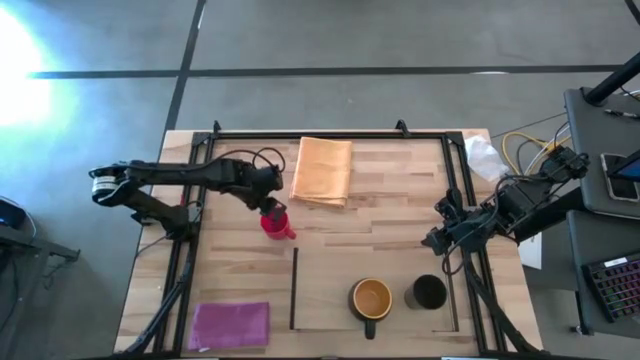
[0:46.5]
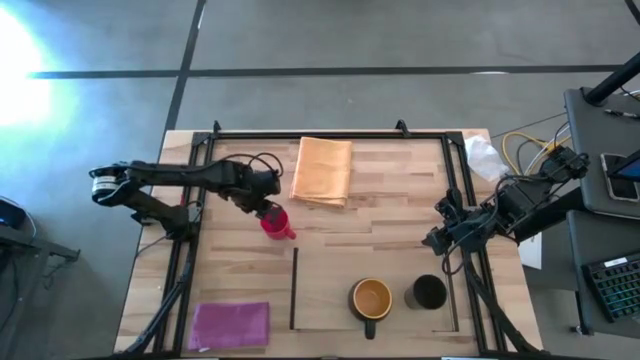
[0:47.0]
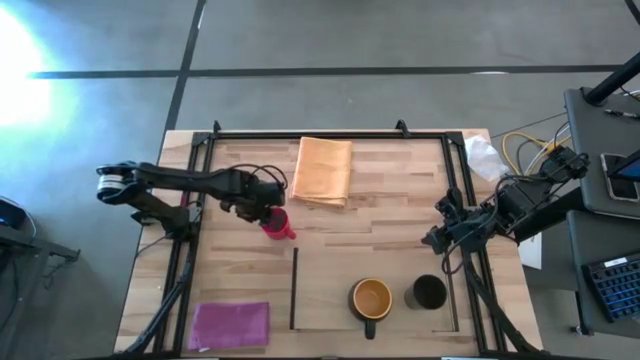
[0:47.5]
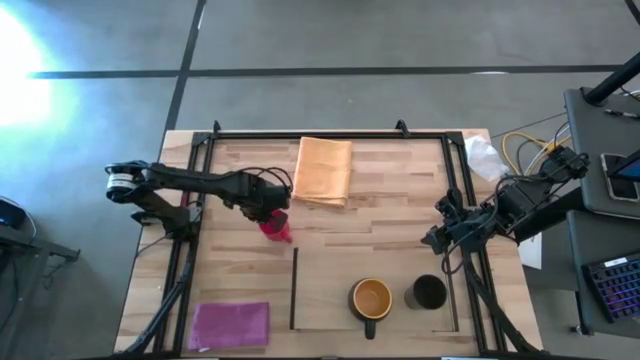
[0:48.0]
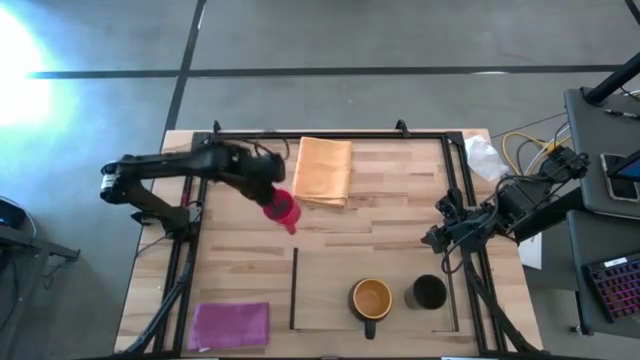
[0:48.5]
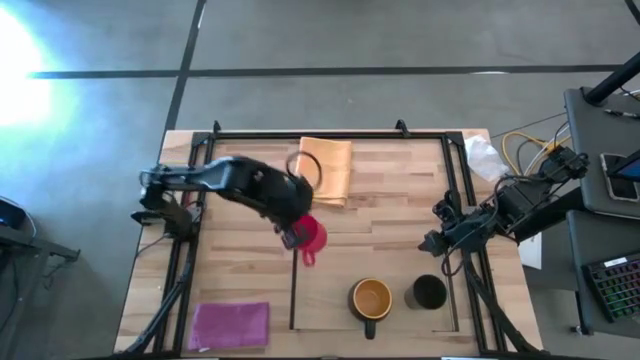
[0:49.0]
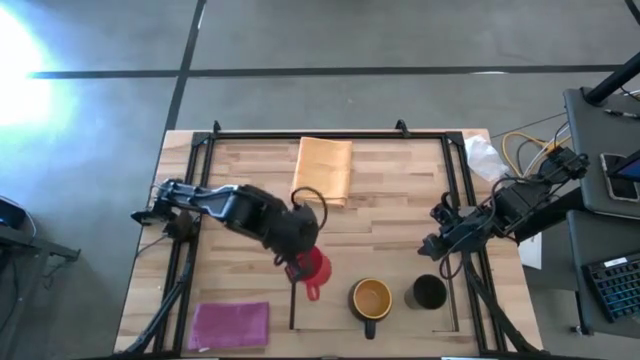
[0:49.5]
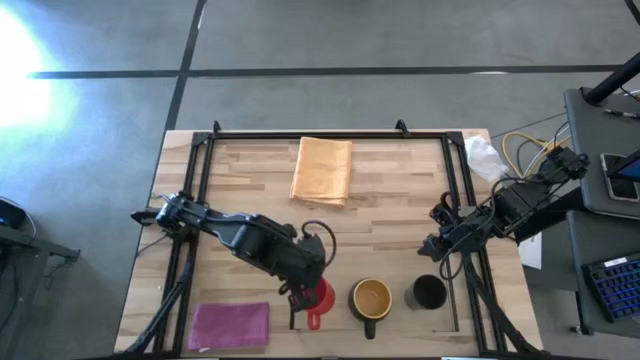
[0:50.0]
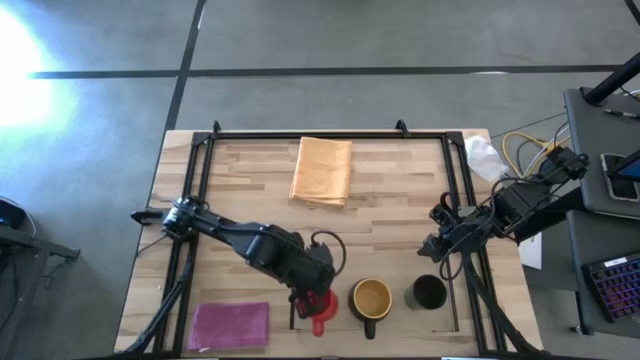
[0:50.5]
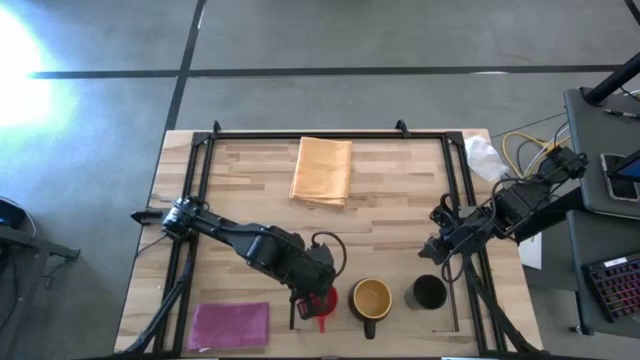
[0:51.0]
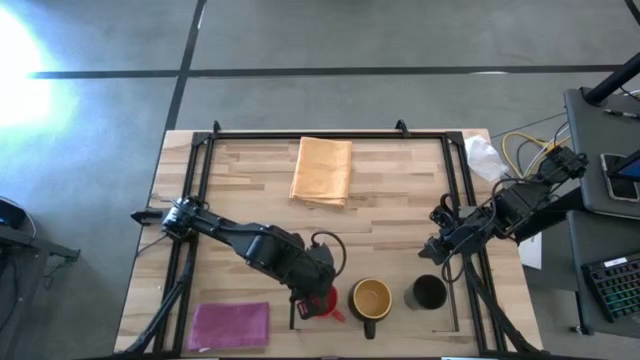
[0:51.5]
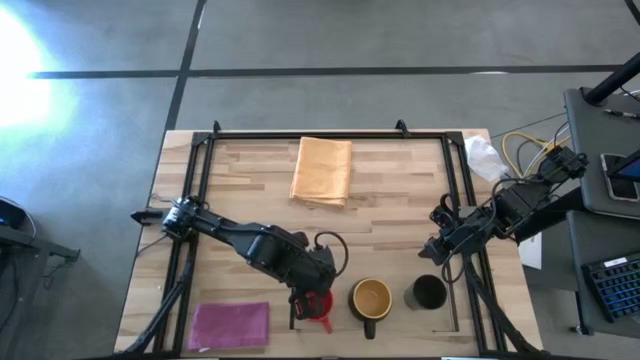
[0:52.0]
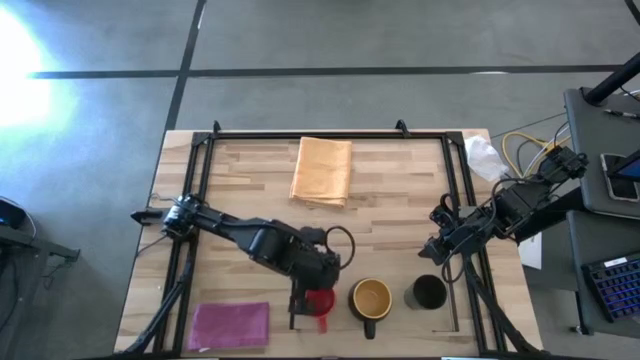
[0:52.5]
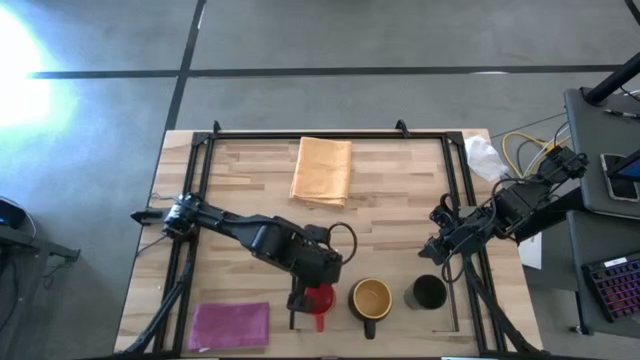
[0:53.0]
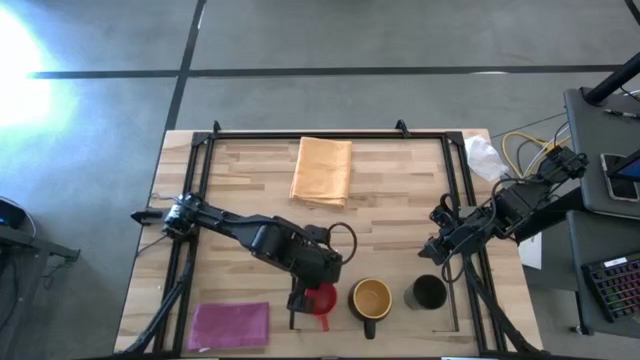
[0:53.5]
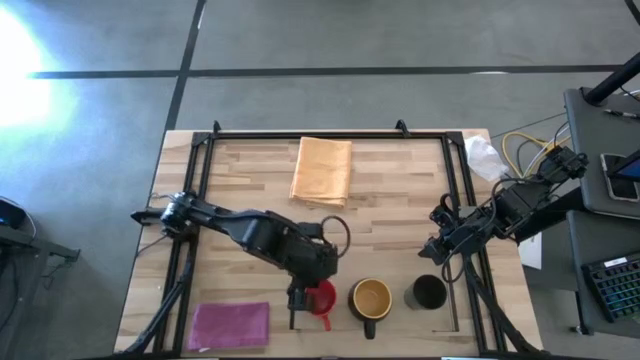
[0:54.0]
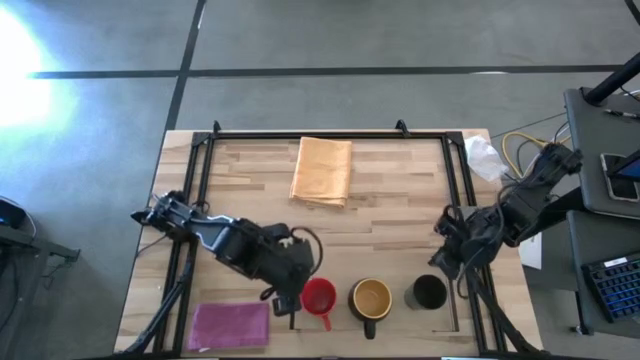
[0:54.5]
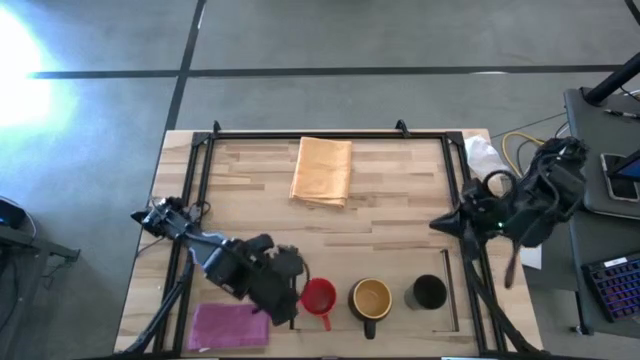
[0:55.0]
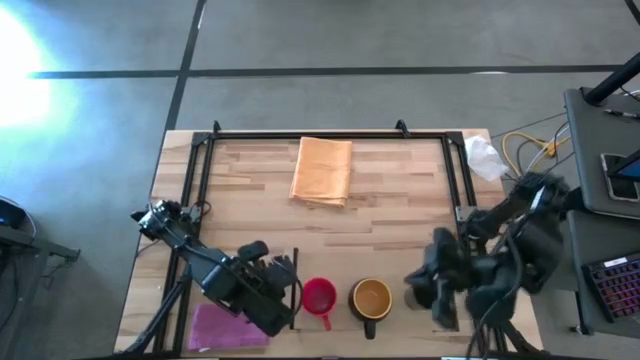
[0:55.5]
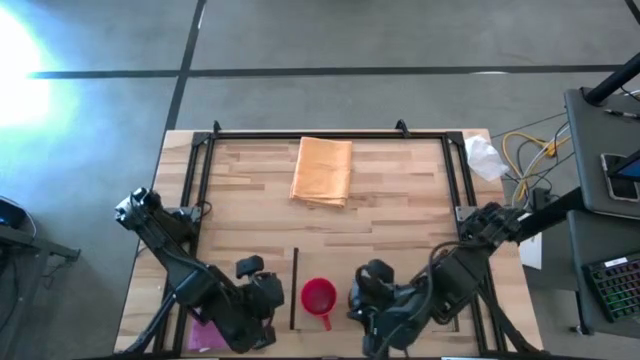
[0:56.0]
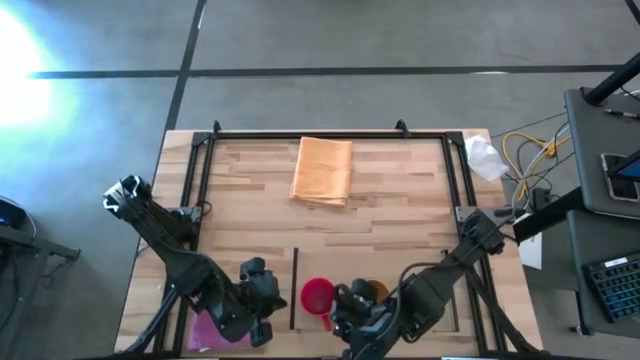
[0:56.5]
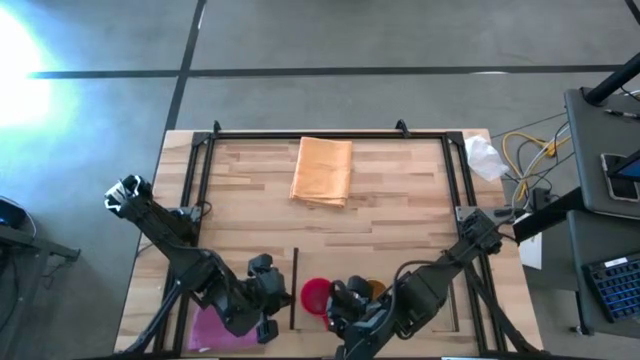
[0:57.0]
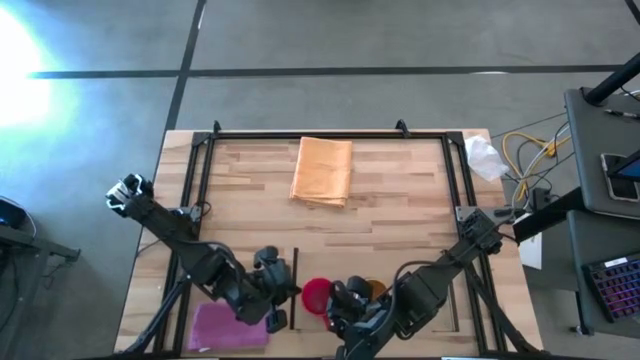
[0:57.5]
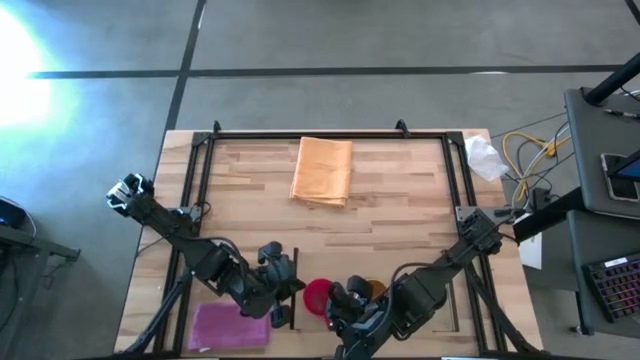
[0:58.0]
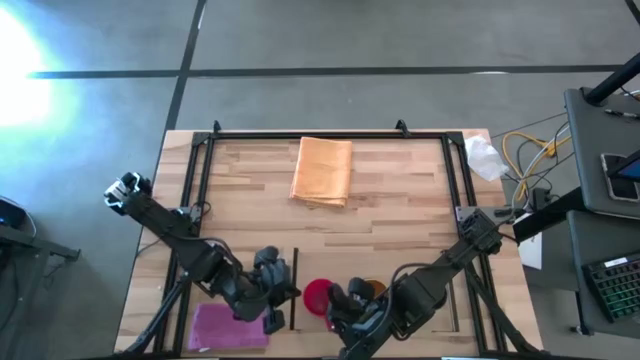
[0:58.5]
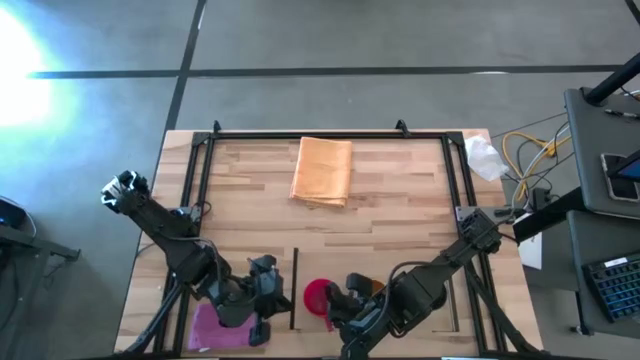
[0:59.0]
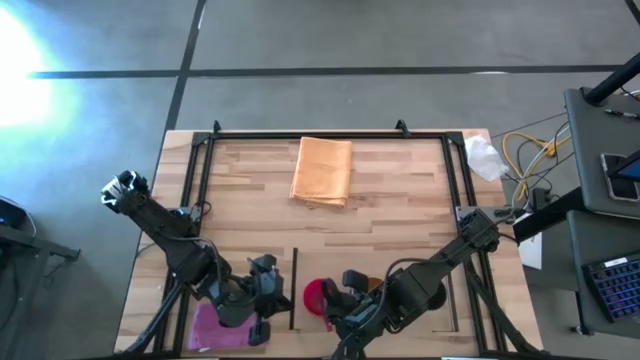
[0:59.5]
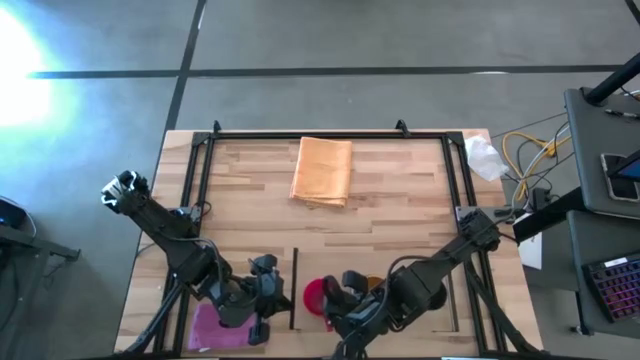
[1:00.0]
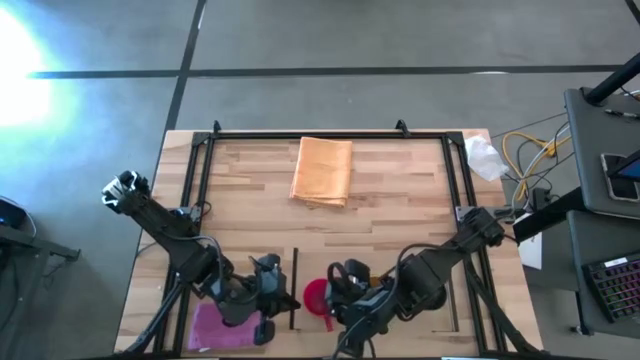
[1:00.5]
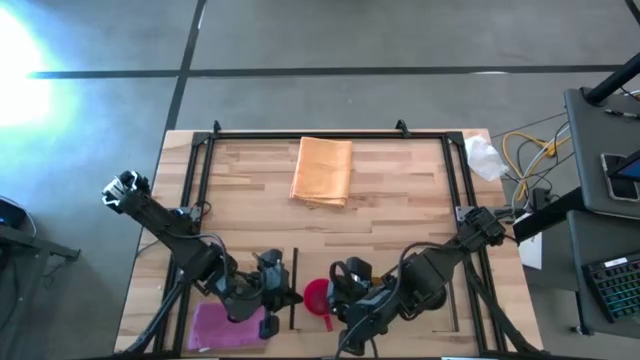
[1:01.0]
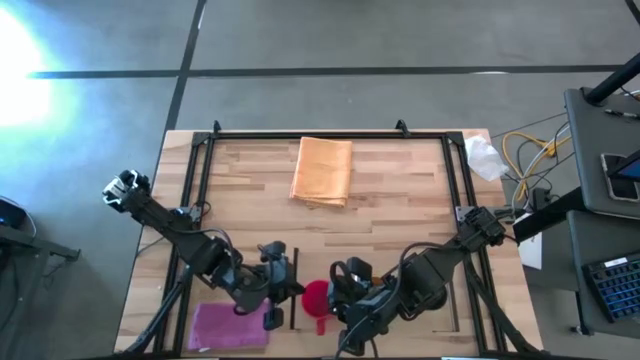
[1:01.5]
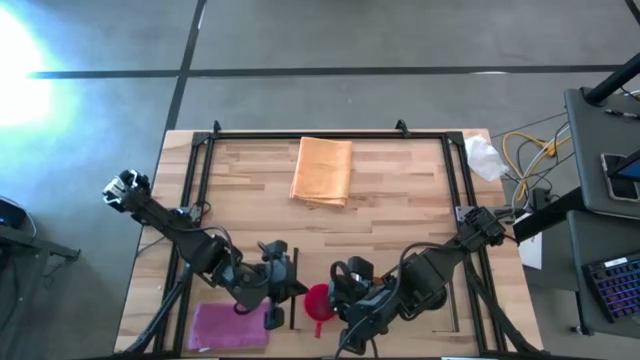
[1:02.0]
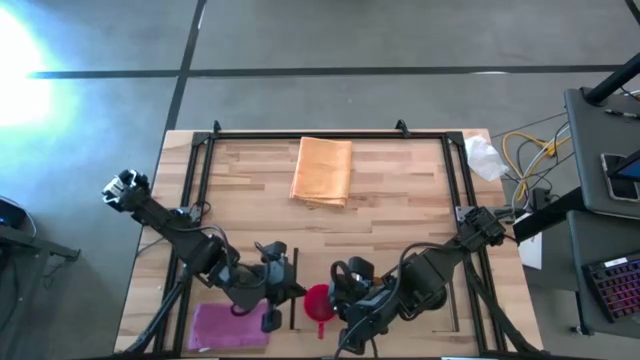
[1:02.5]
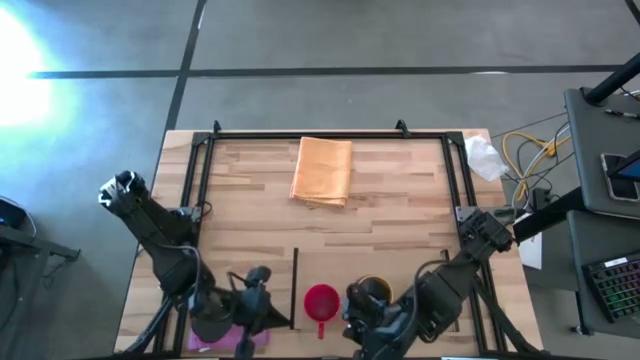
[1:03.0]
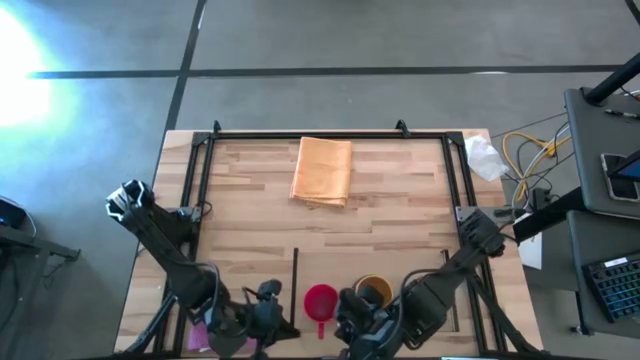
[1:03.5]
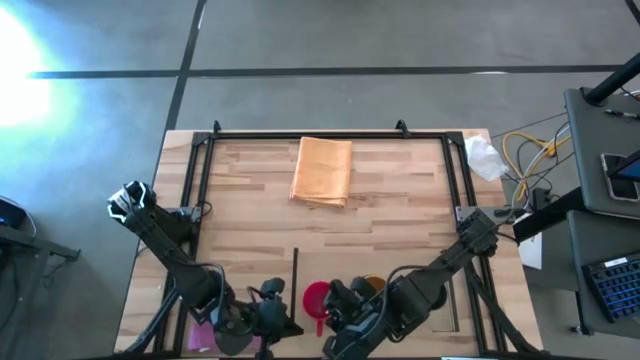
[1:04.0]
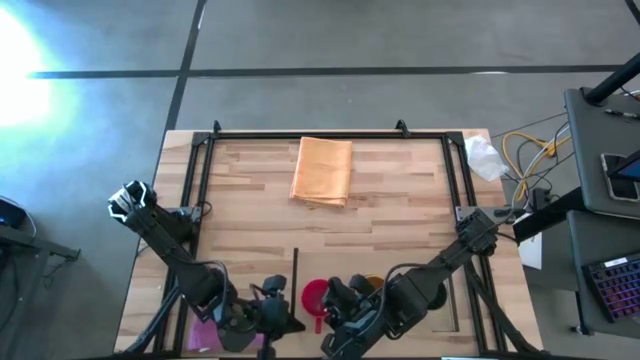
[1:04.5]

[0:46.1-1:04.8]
Task: Stack small to large cups/mugs on shelf
Put the red mug on the shelf

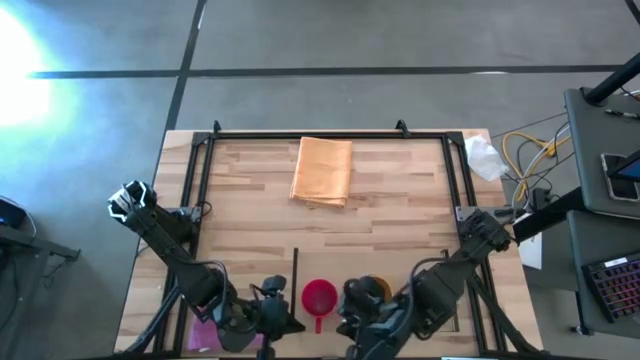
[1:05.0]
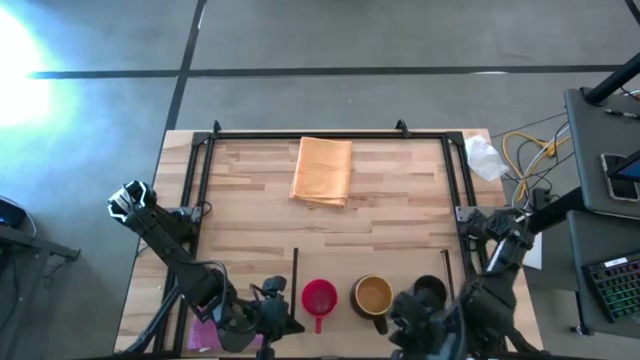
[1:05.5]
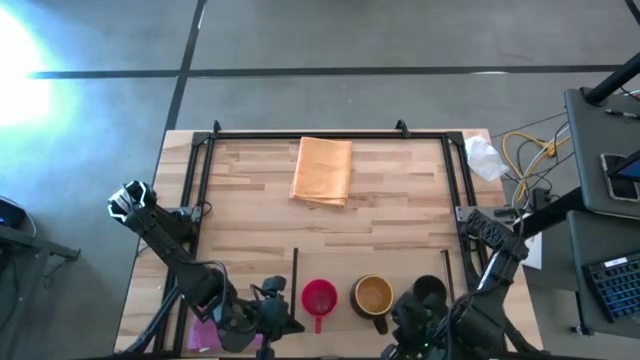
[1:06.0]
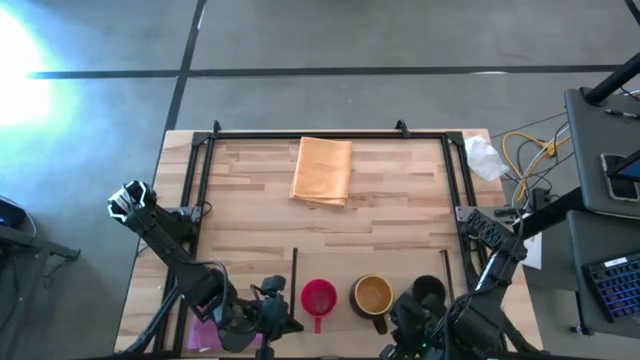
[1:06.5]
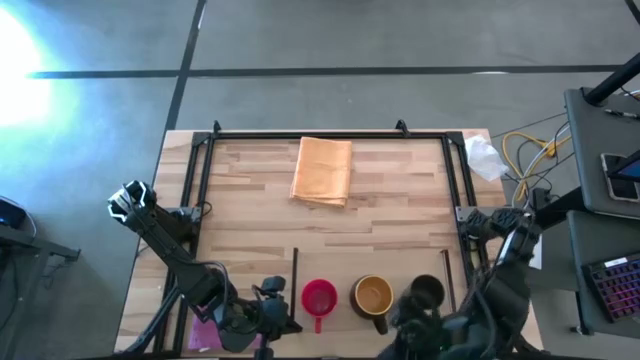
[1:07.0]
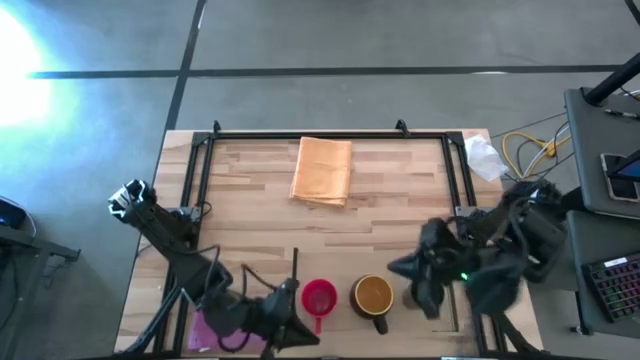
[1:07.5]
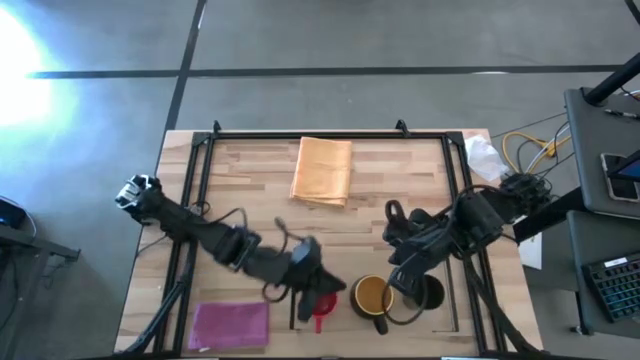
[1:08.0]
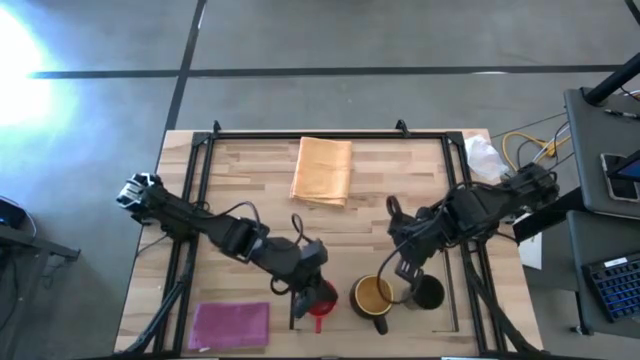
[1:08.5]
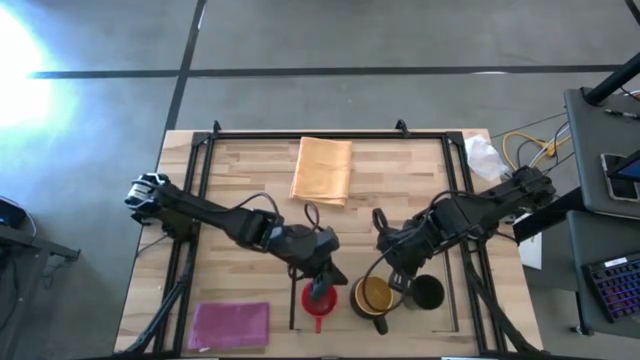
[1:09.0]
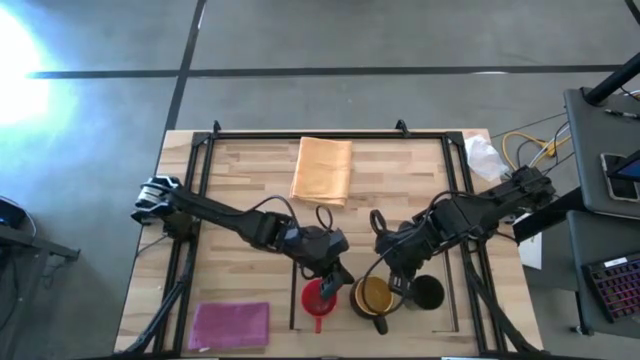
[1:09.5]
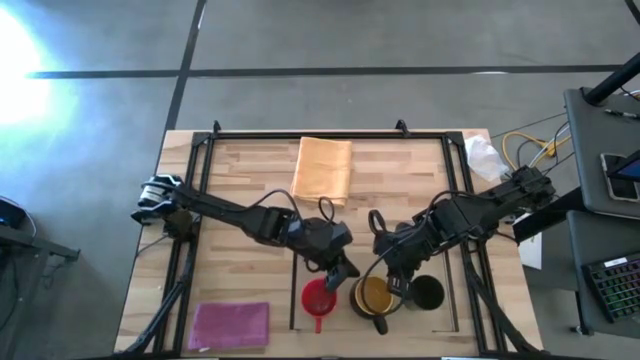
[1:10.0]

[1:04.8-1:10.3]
Adjust the black mug on the shelf
